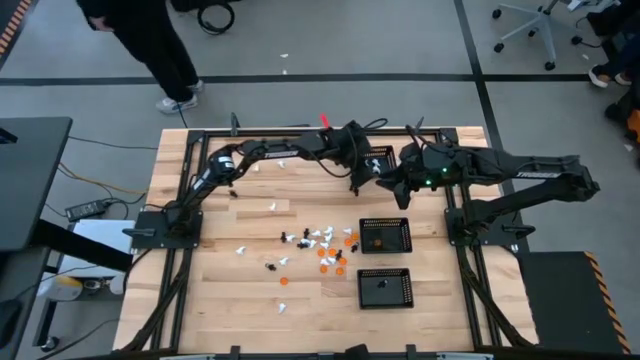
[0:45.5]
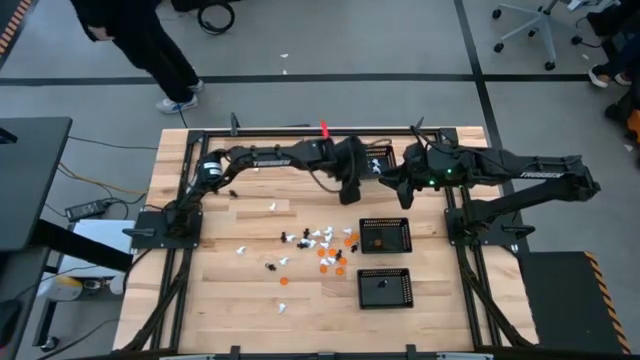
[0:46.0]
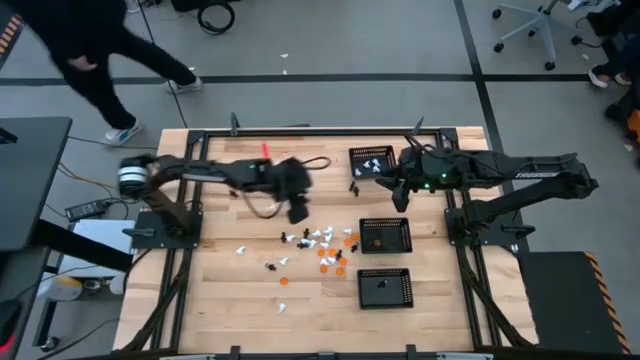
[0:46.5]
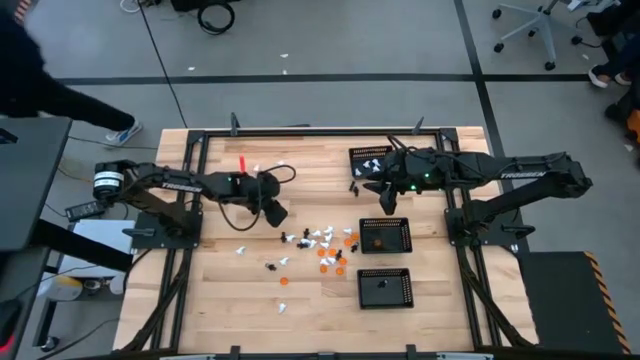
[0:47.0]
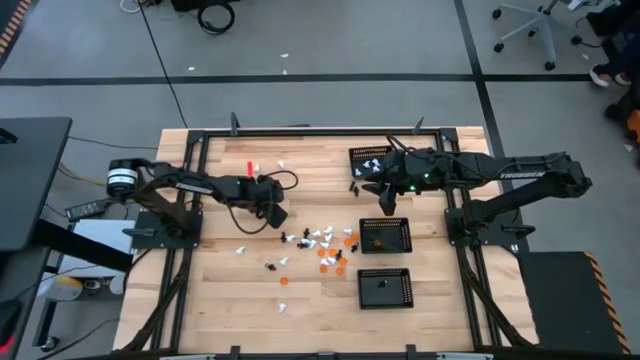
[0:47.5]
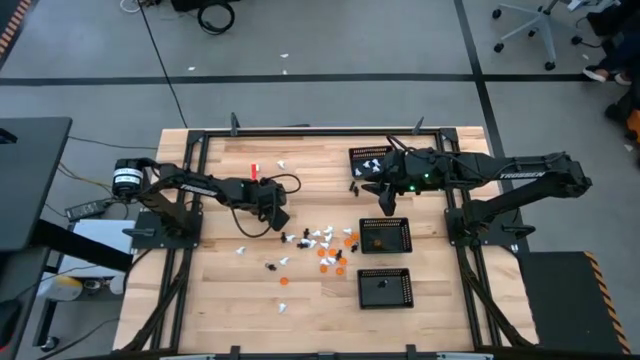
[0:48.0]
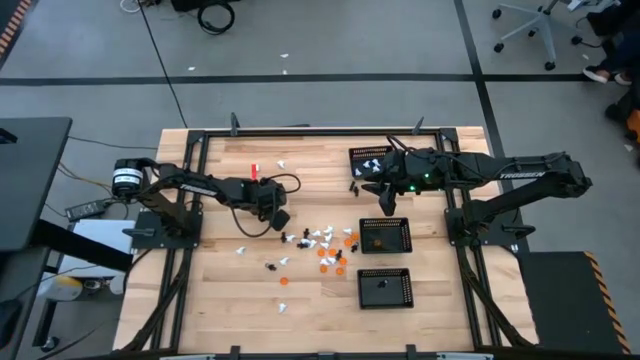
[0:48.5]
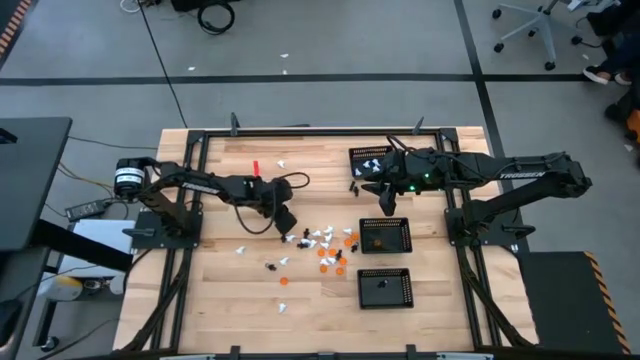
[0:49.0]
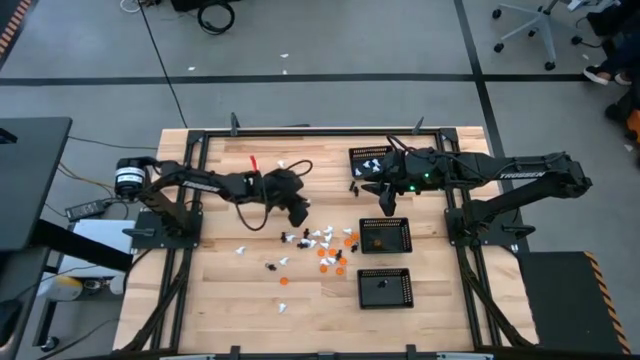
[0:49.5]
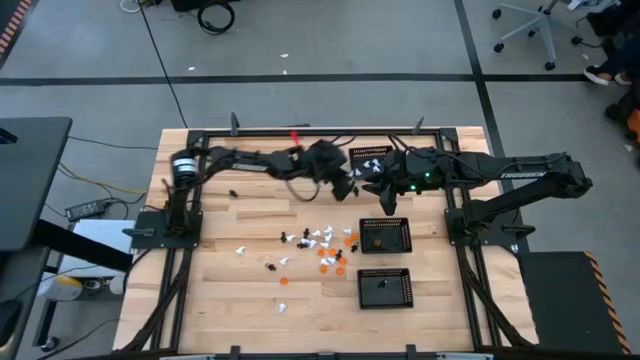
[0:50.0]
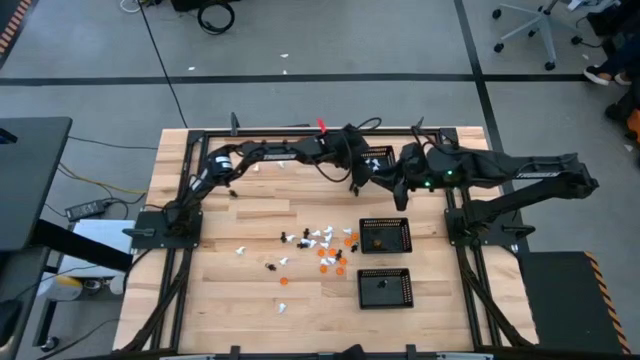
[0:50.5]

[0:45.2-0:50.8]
Task: Sort Halloween decoration
Put the white ghost toy into the top black bin

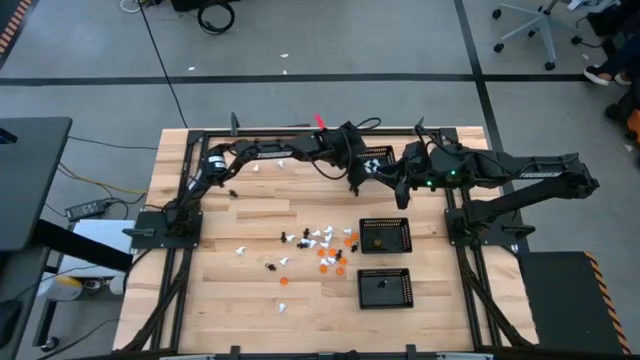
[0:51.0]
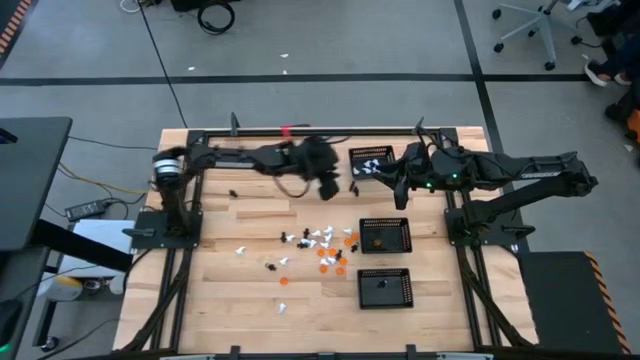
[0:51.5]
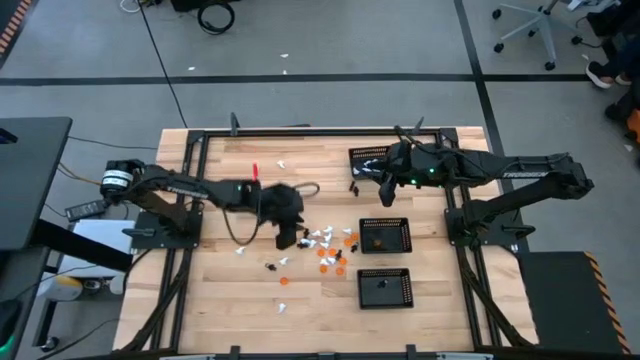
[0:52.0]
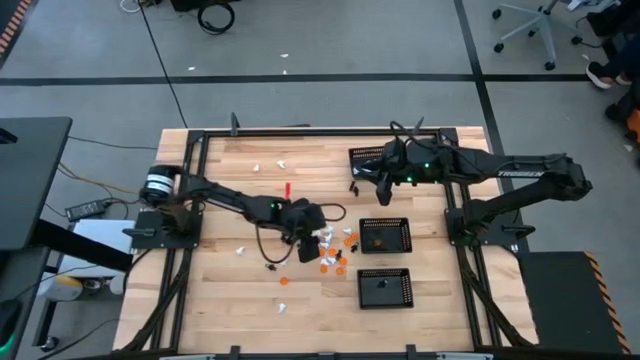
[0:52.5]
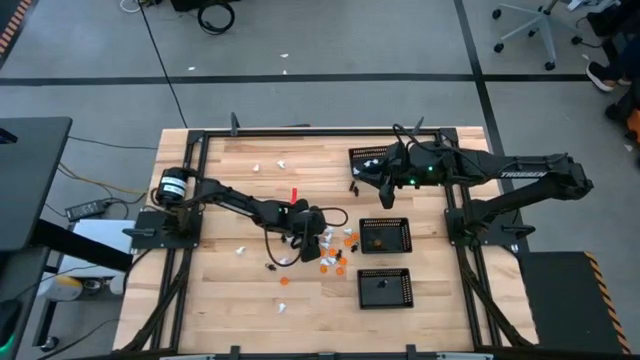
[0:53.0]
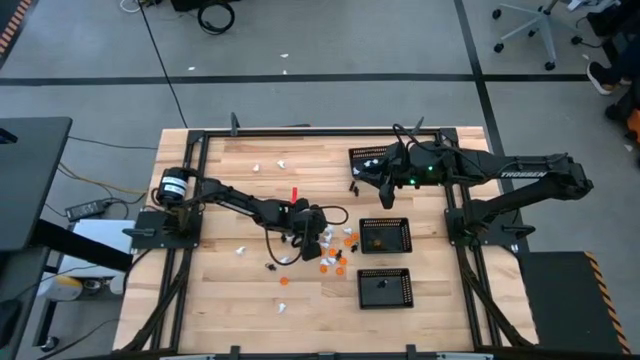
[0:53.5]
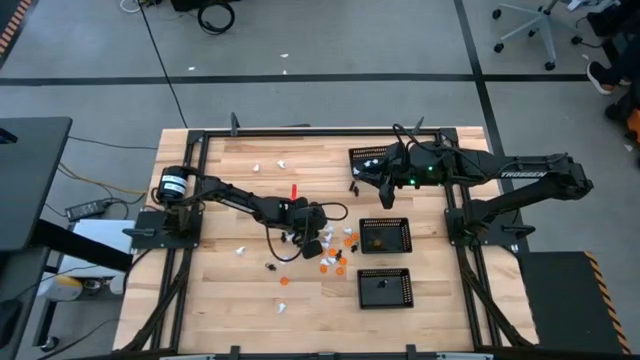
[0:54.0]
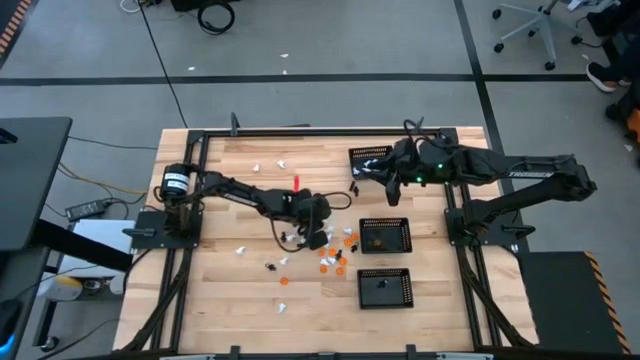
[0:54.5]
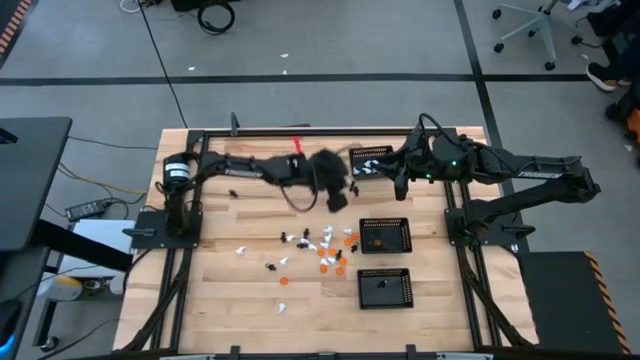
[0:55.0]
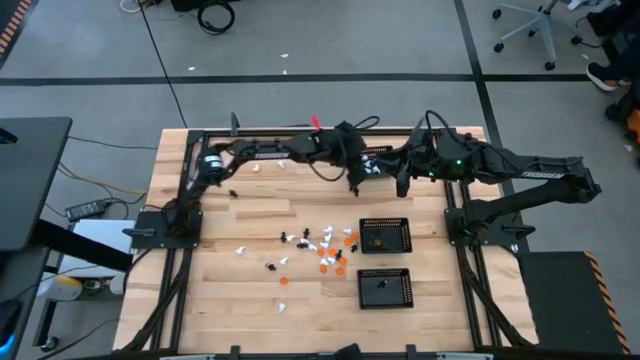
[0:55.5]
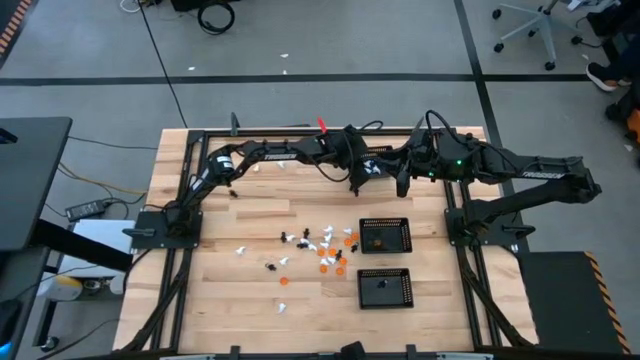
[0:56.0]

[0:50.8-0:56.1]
Put the white ghost toy into the top black bin

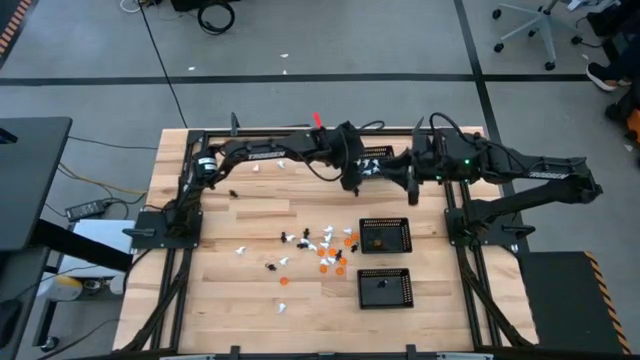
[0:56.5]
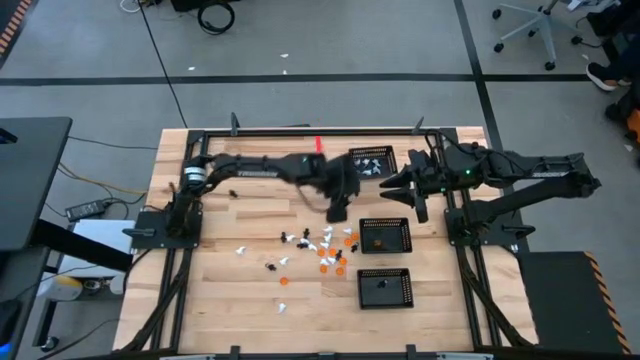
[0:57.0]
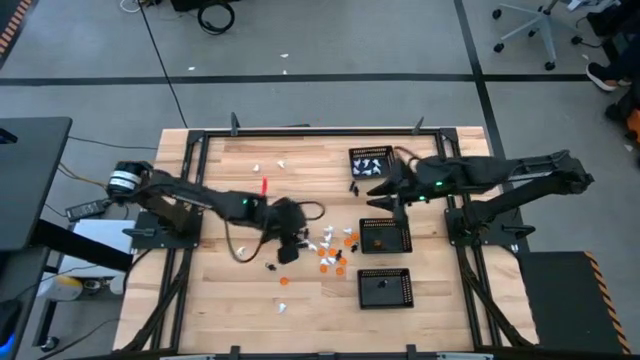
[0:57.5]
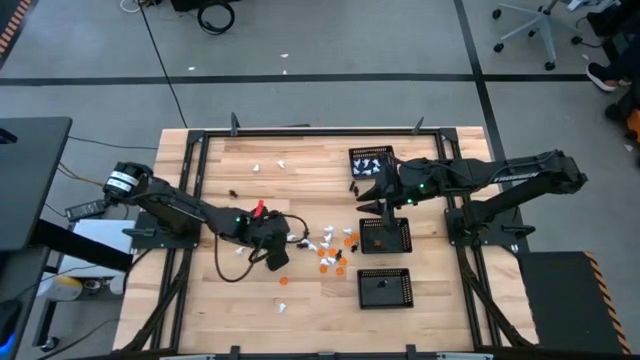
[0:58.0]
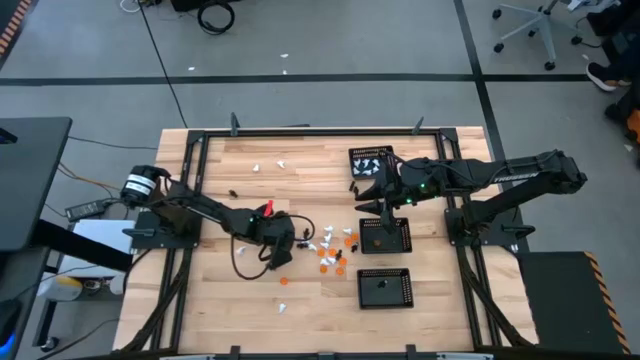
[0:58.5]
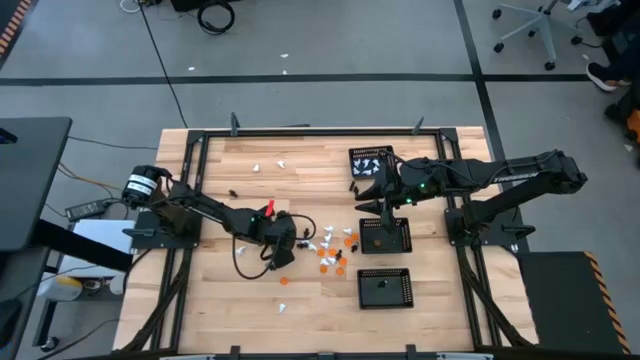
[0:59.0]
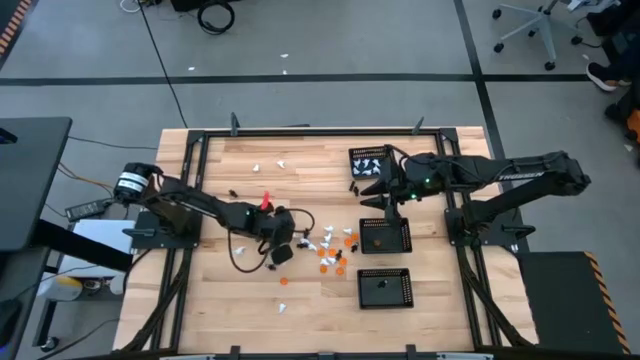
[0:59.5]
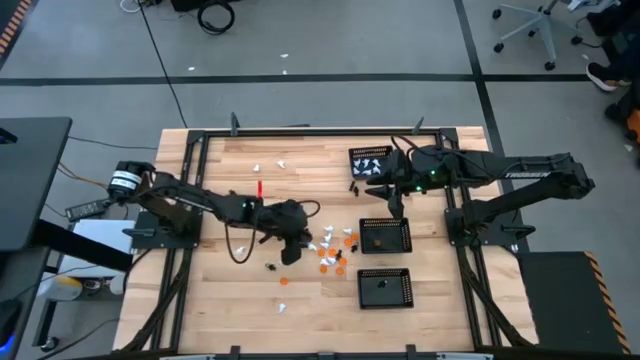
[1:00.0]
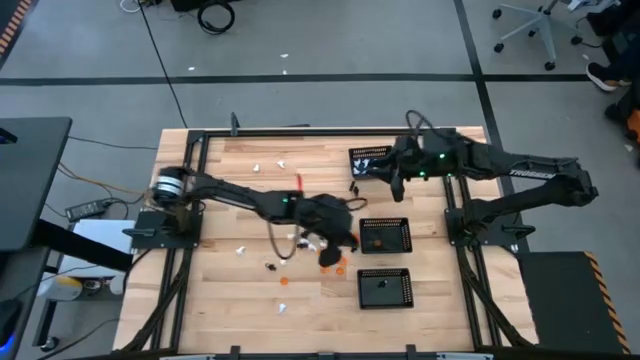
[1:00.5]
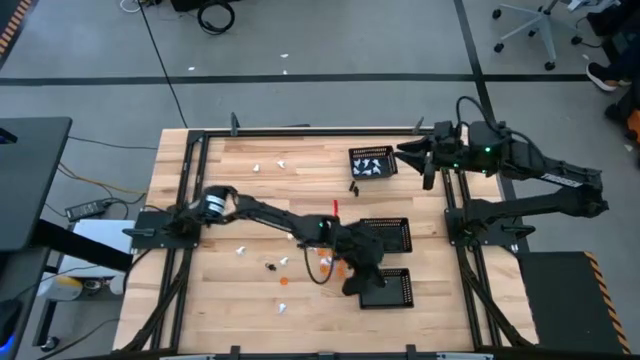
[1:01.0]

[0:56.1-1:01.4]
Put the black skeleton toy into the bottom black bin

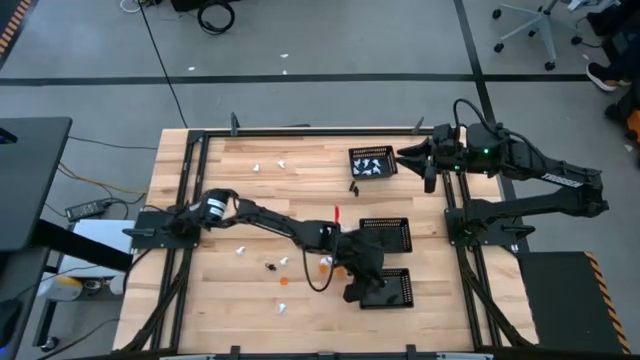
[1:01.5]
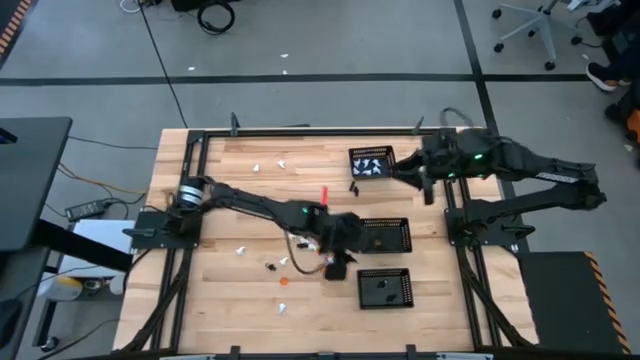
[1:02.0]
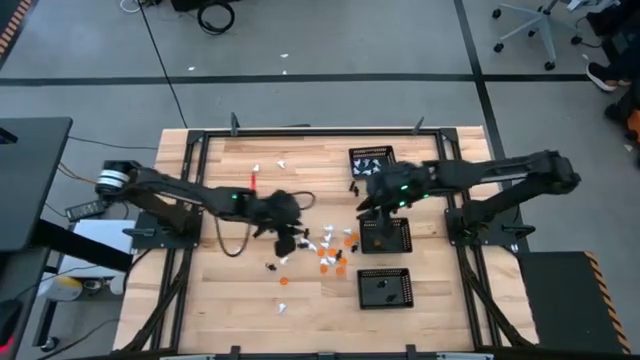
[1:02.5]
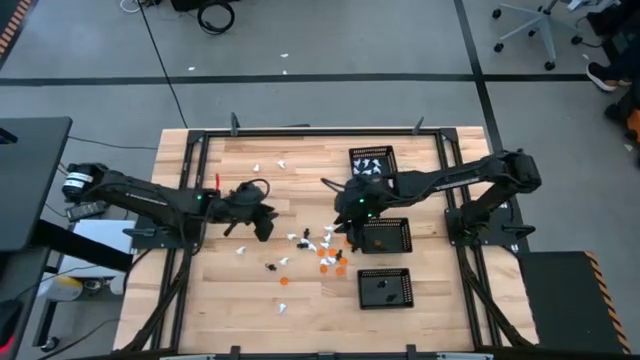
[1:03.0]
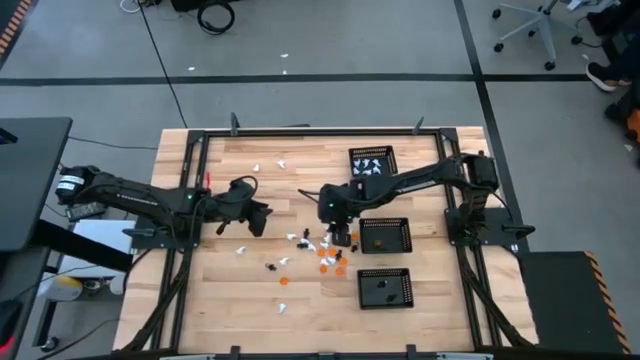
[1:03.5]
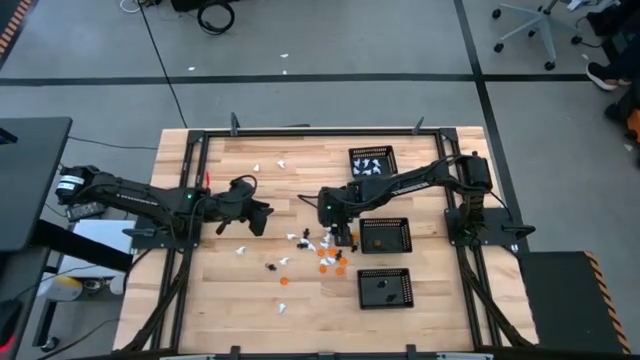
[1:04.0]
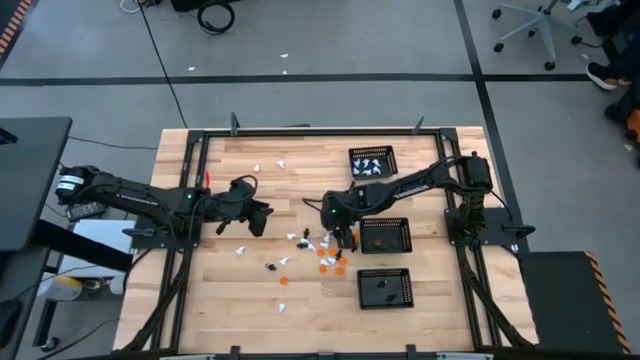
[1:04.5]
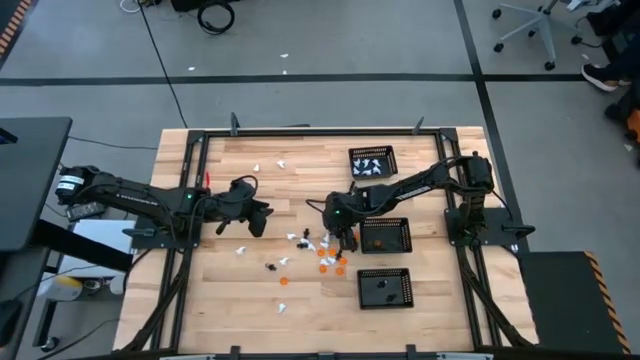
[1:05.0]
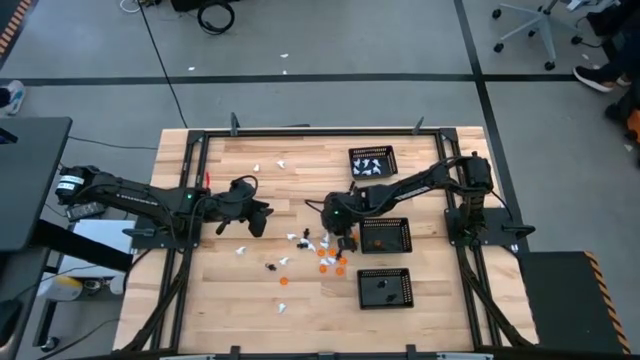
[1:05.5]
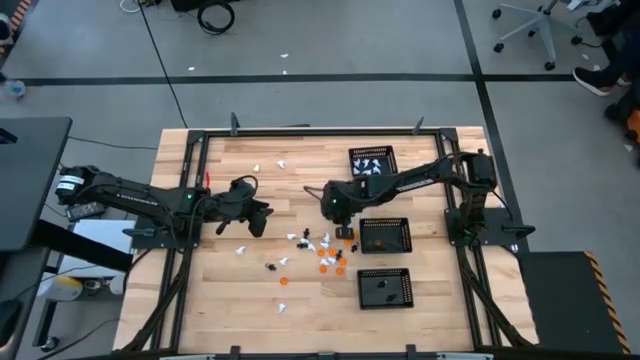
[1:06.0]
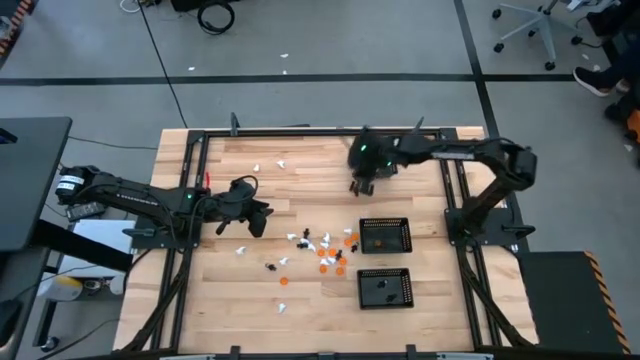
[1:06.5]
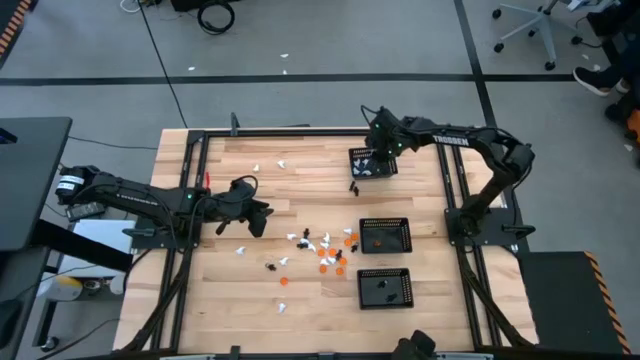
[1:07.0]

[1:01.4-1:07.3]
Put the white ghost toy into the top black bin
